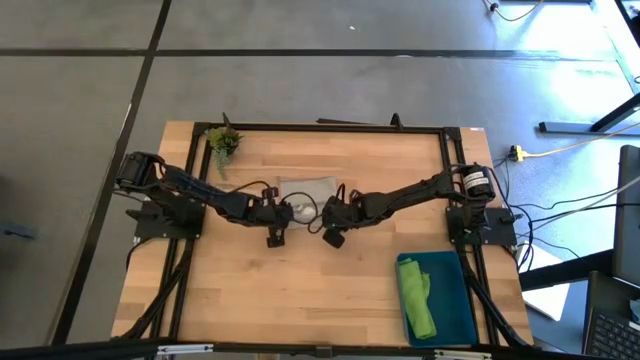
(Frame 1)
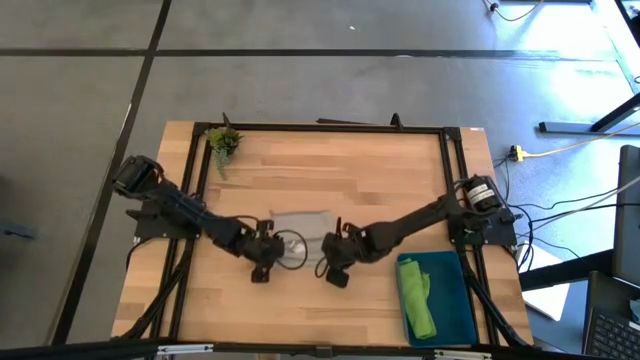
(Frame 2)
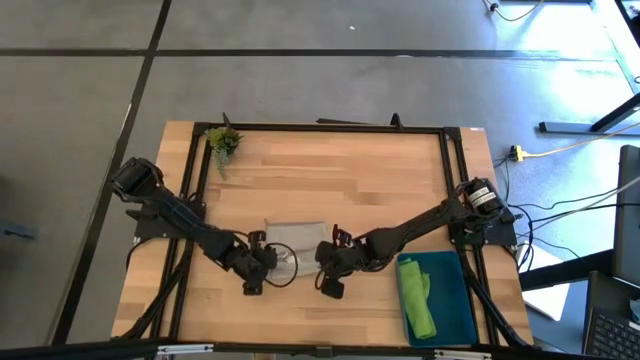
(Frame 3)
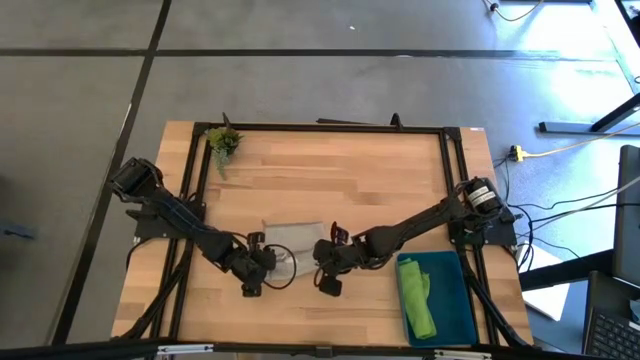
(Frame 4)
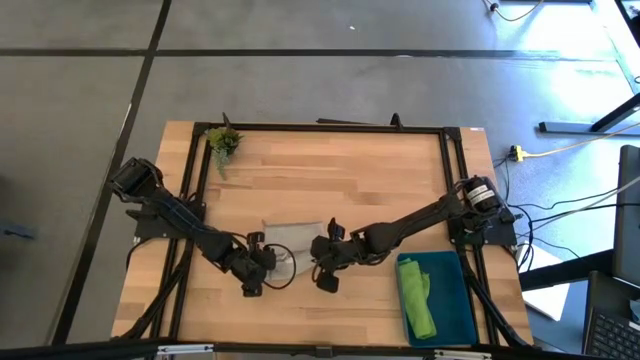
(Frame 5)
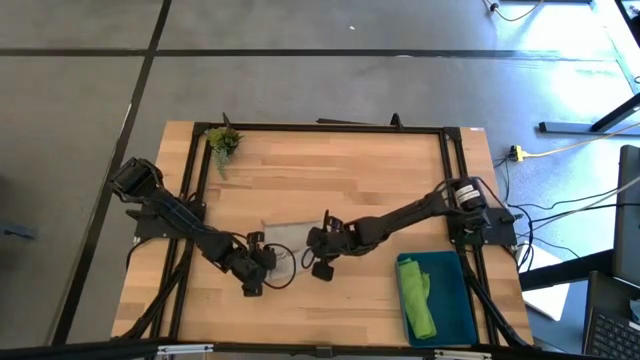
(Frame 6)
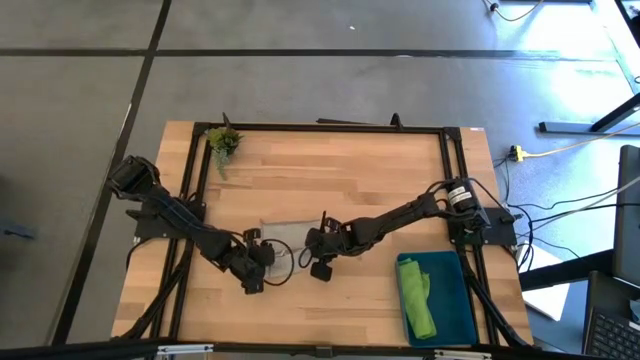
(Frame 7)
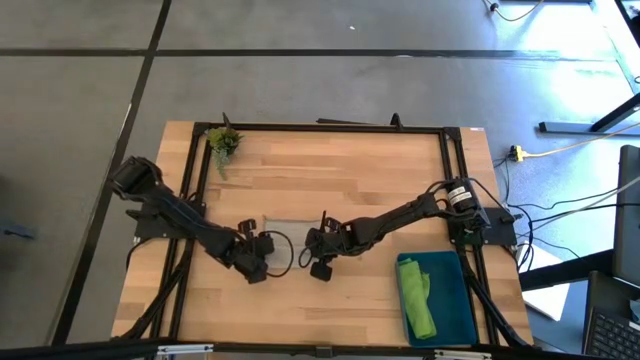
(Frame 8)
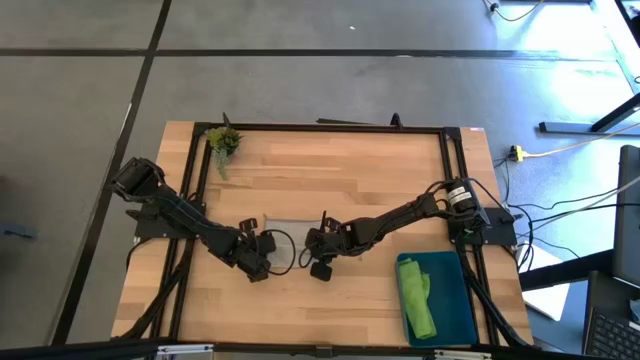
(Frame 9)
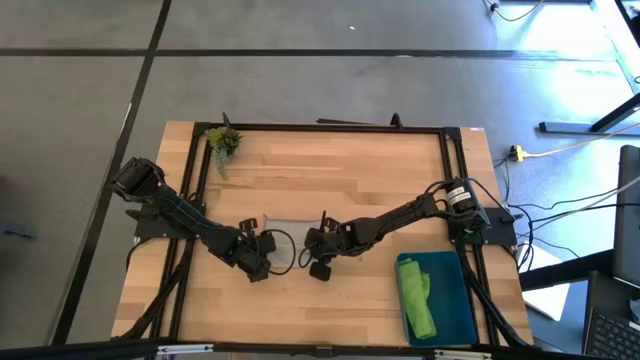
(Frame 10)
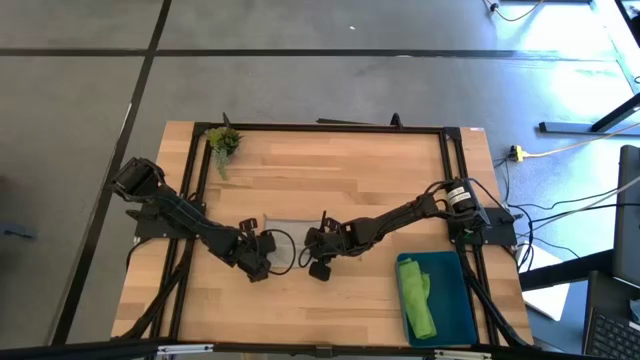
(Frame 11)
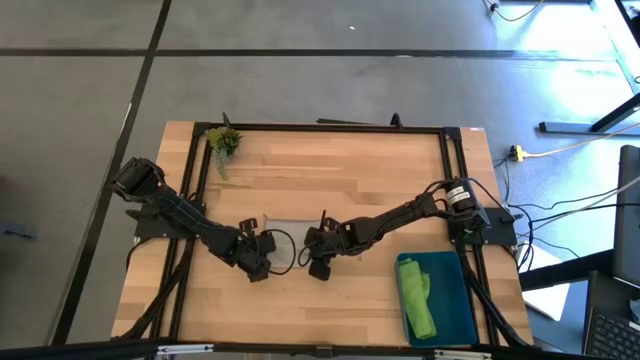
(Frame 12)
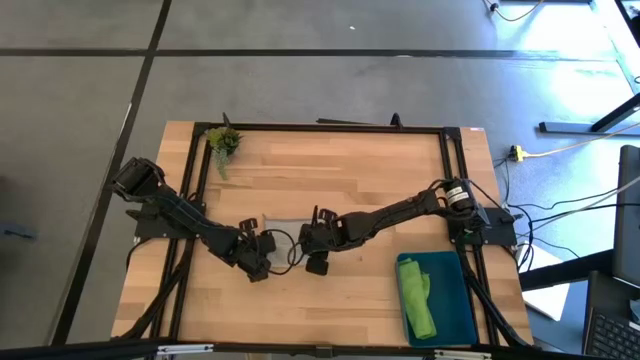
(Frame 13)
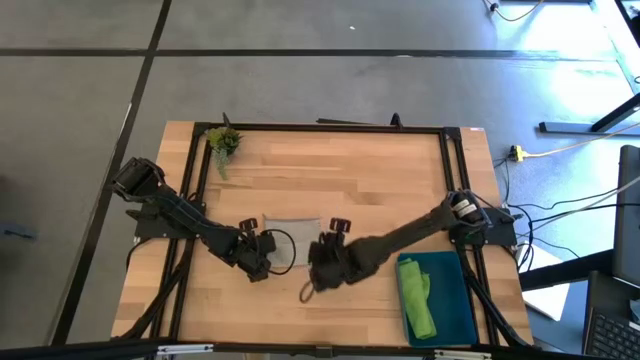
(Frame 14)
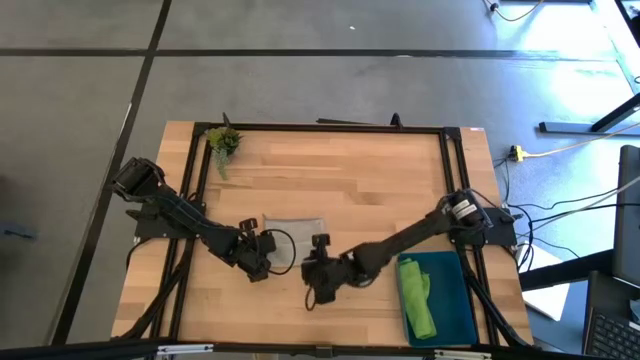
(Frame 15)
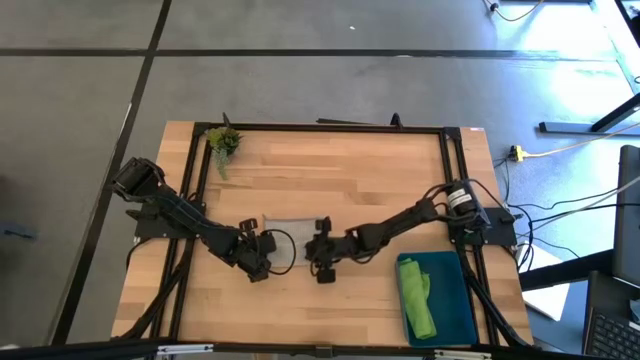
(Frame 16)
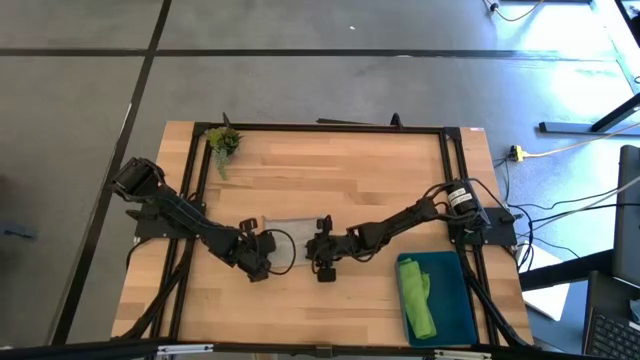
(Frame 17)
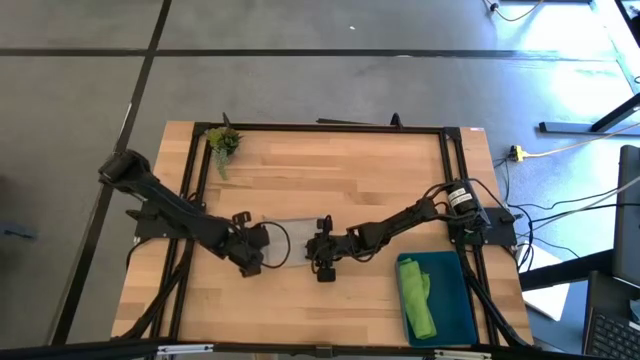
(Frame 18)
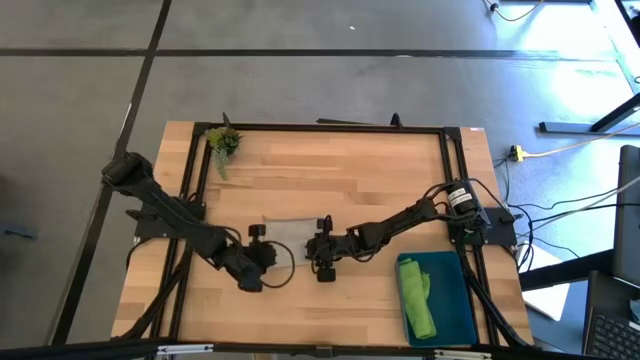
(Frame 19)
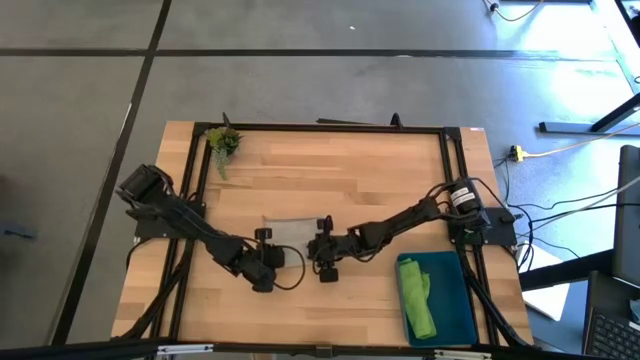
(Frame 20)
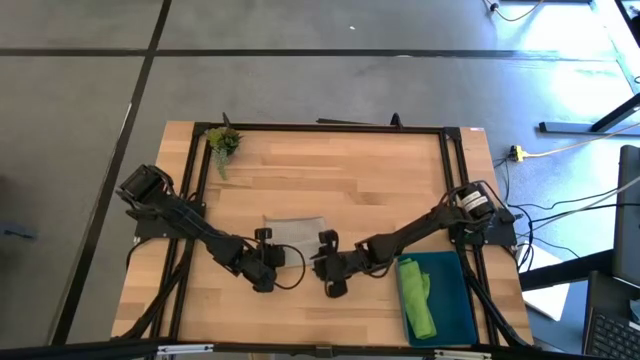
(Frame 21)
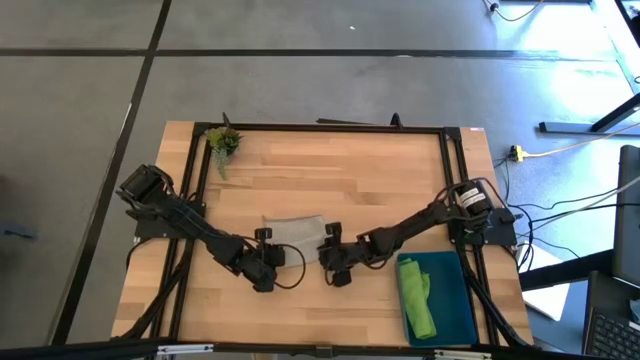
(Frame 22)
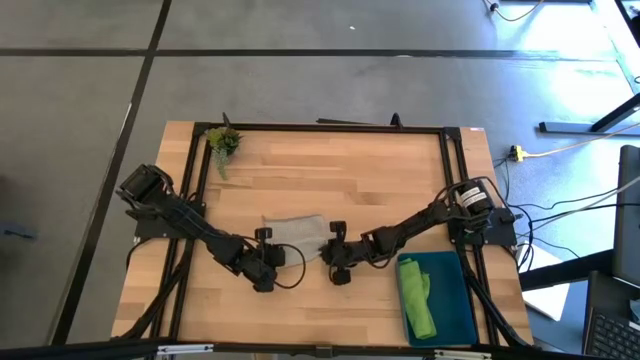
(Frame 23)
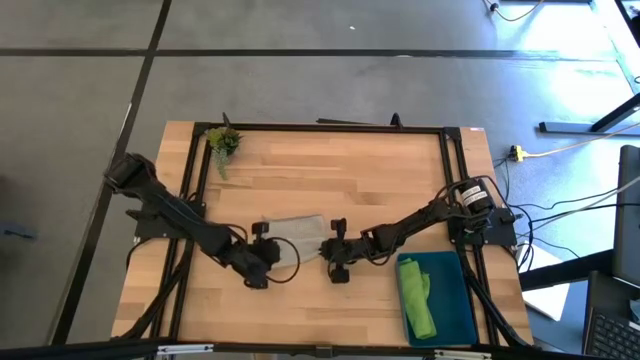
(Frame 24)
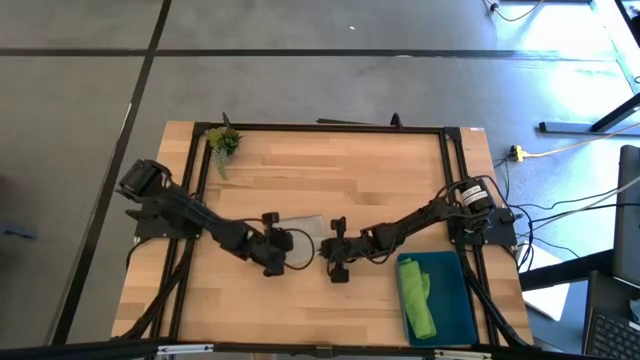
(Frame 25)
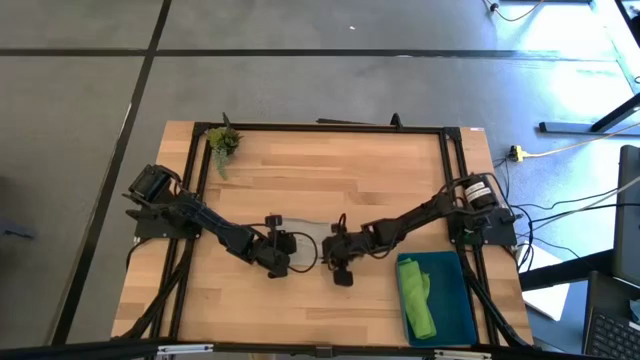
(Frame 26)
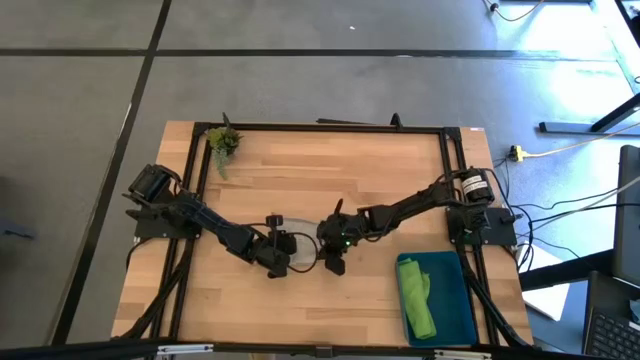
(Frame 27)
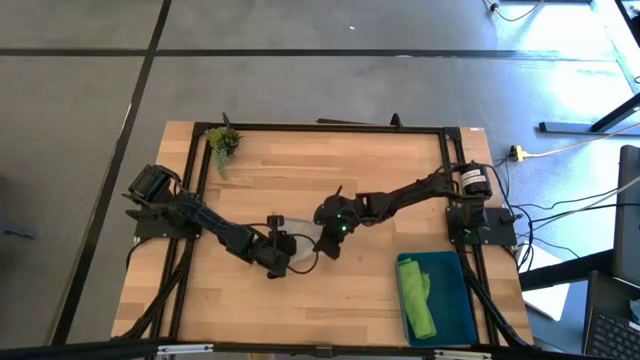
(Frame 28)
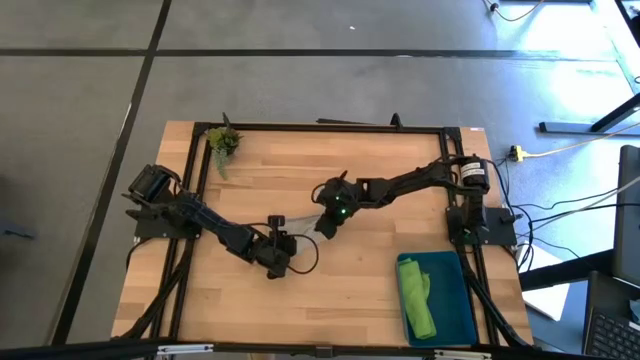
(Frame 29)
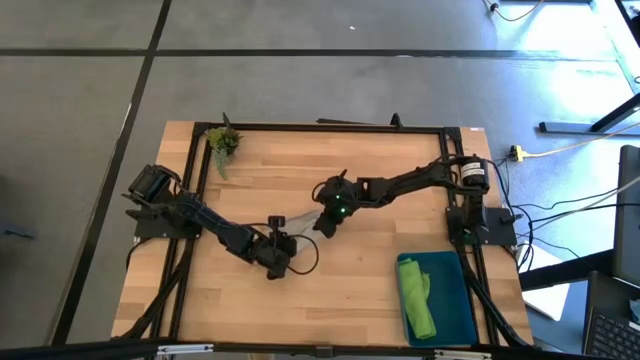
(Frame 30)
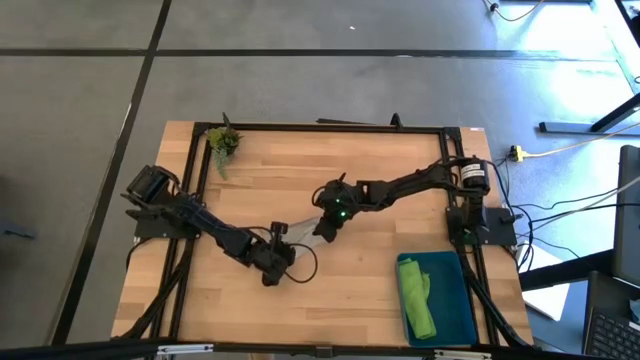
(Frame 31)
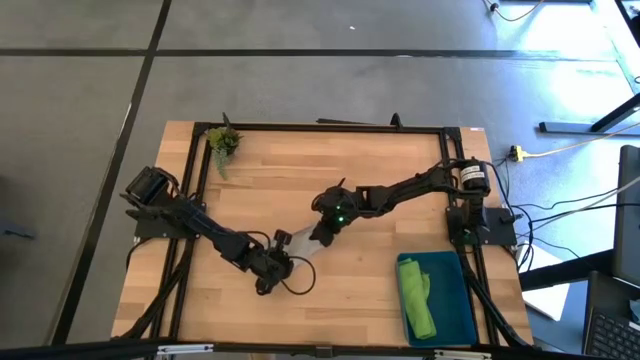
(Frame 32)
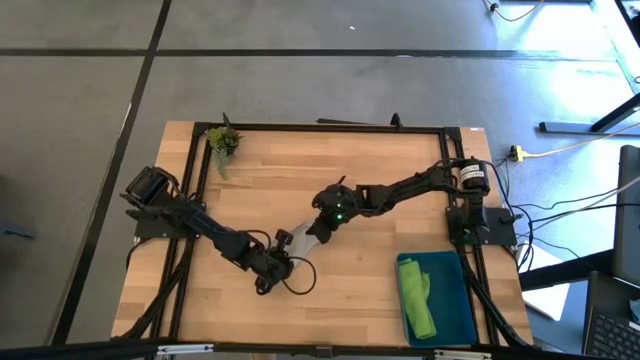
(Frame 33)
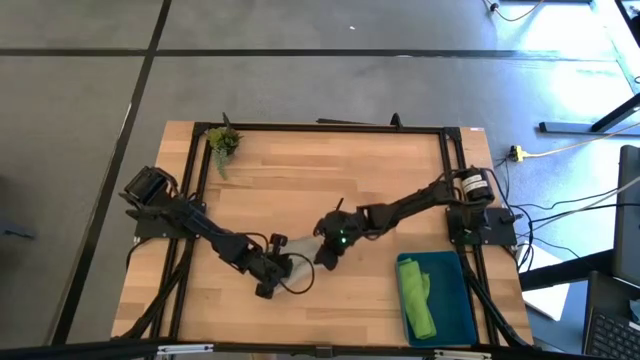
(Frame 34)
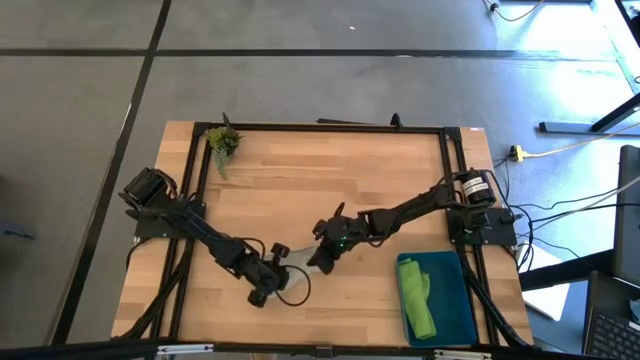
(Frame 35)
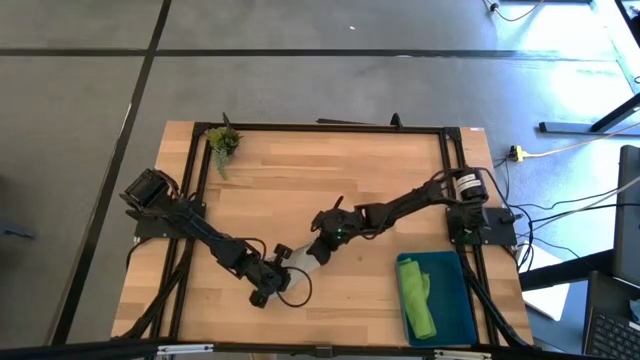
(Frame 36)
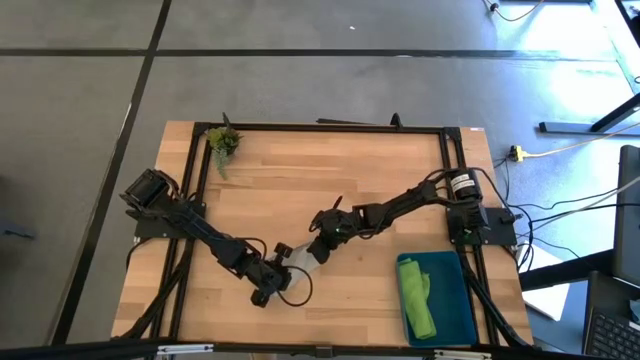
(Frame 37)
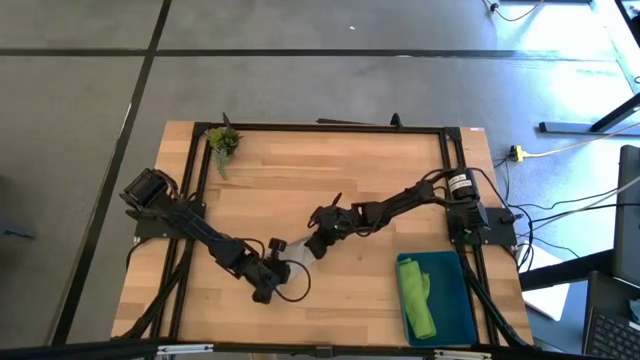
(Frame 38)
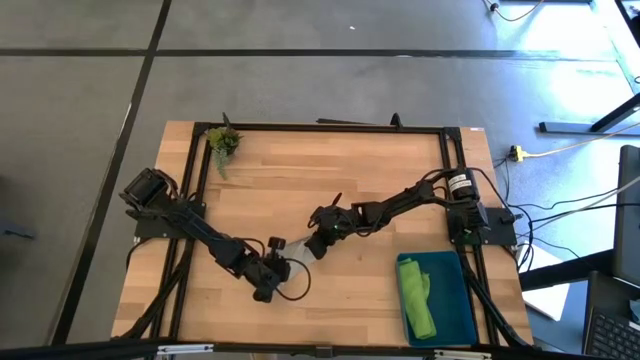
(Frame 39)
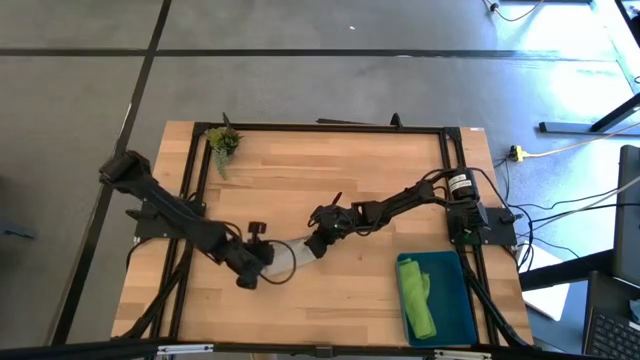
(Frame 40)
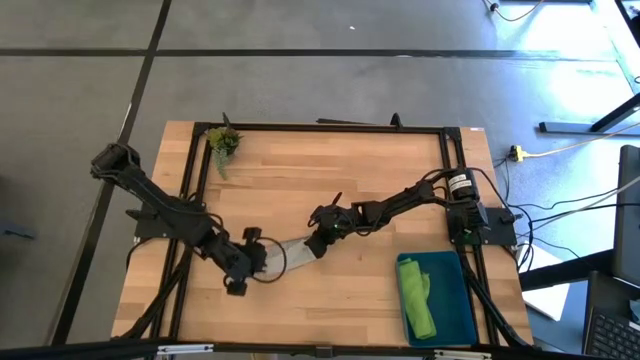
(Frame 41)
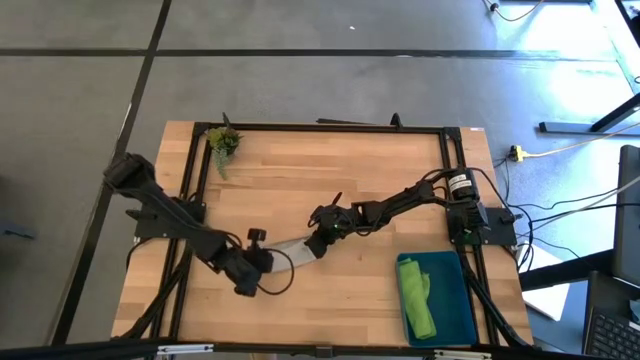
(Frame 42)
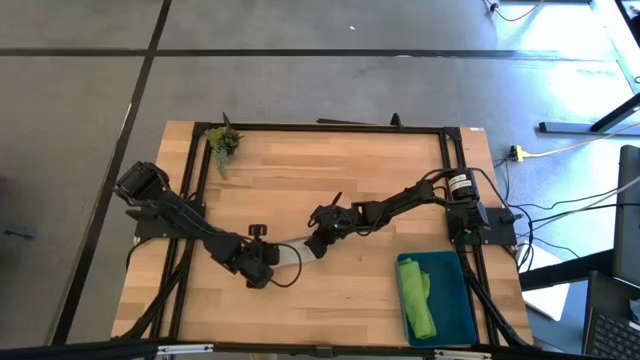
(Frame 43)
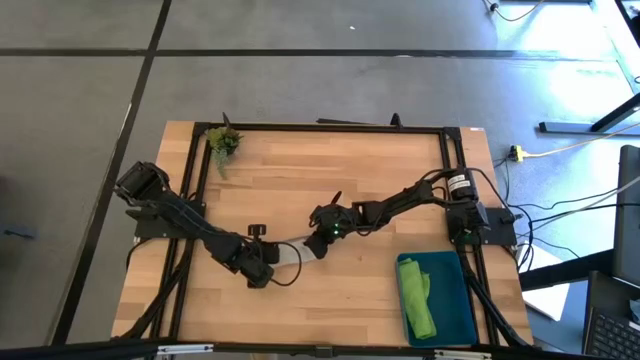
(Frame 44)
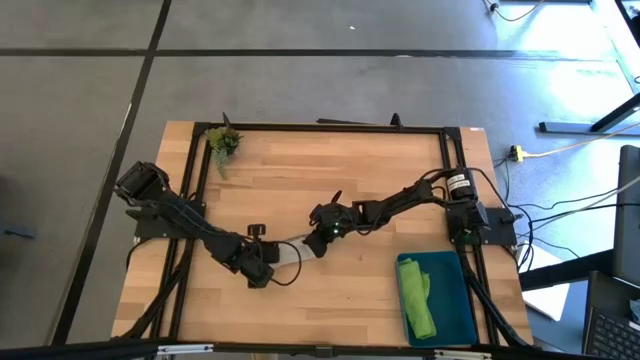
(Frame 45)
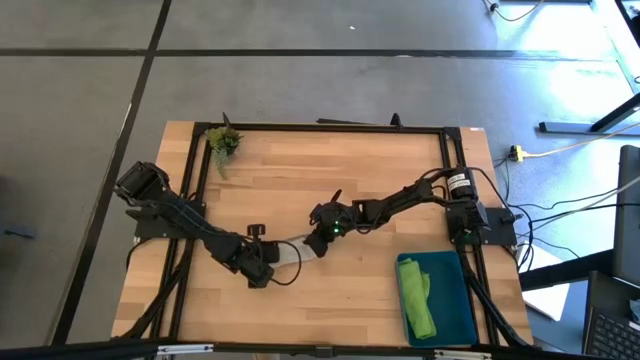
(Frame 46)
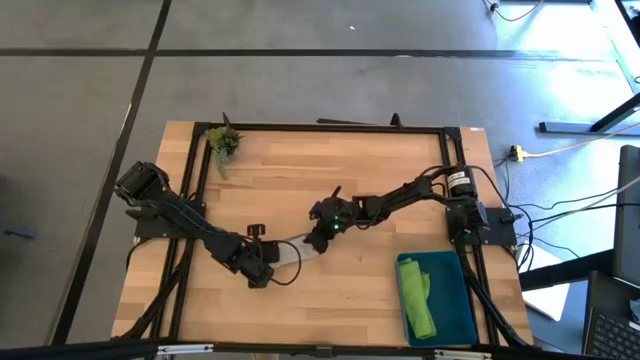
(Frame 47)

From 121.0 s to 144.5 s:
Task: Roll microfiber towels into tight, uniform cylinder then place into a basket
Roll the gray microfiber cloth
